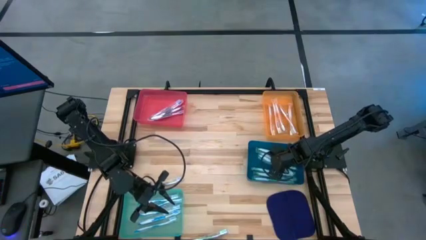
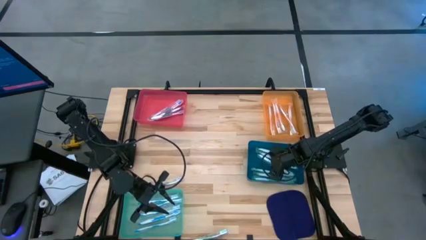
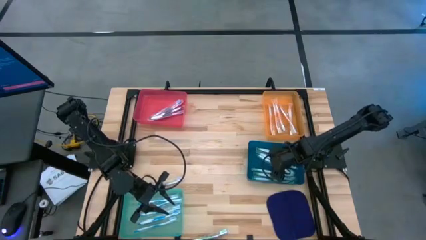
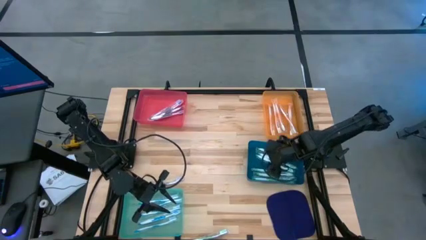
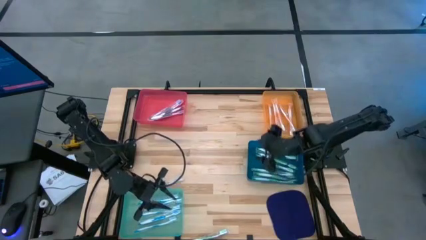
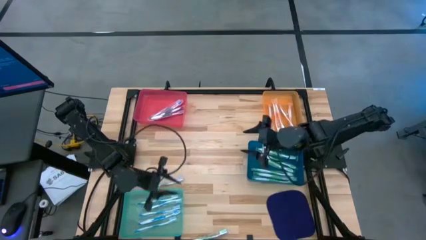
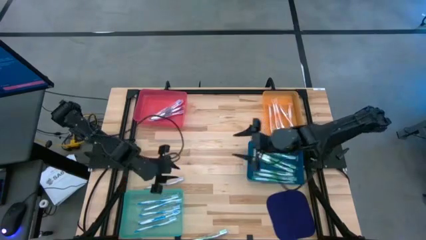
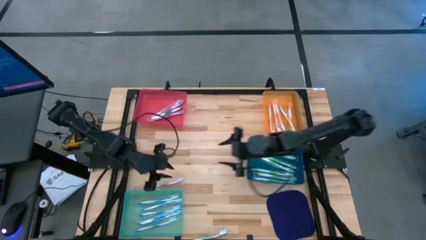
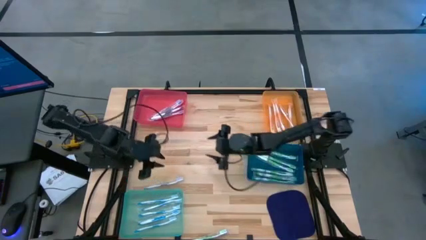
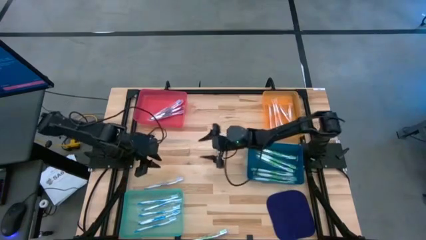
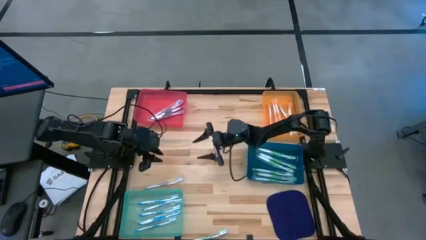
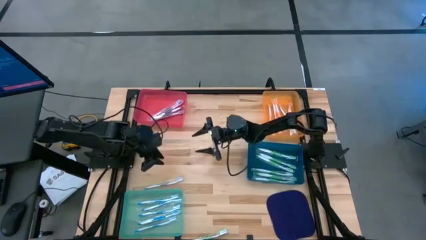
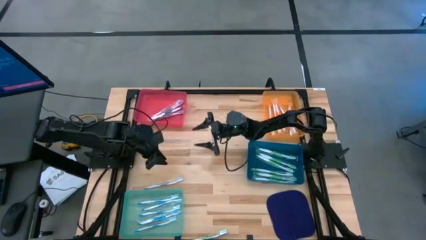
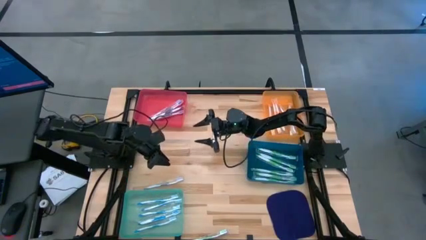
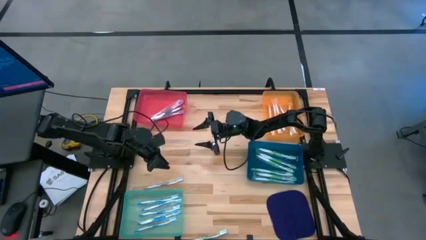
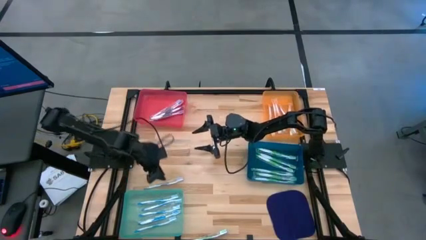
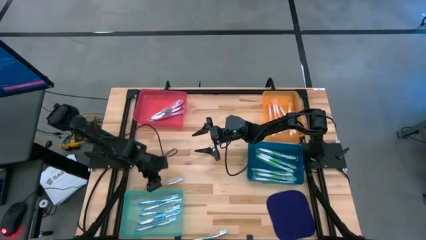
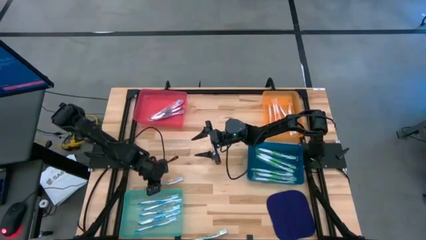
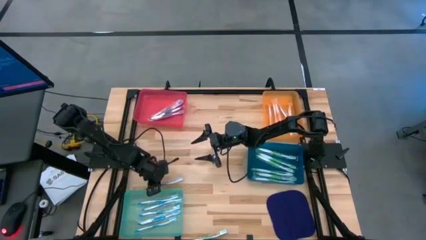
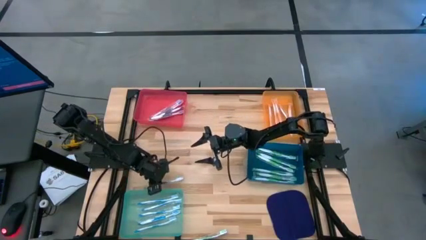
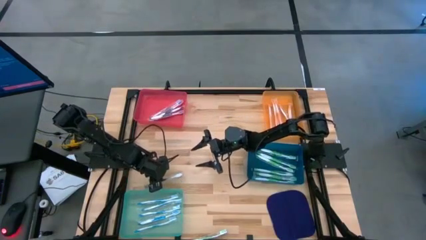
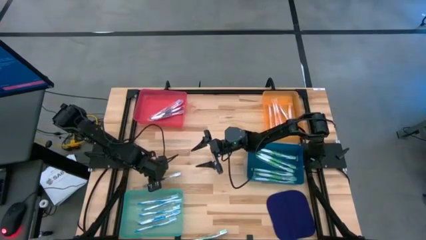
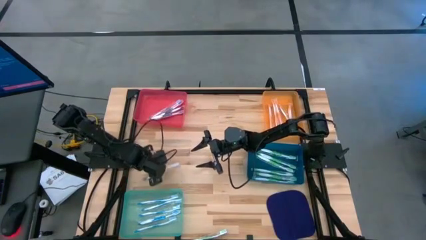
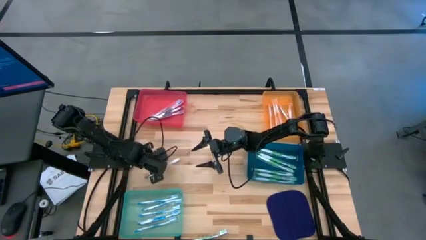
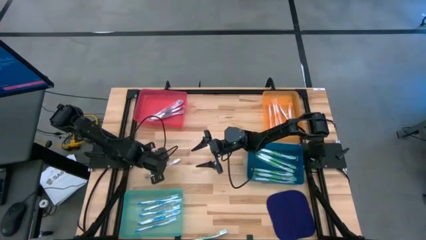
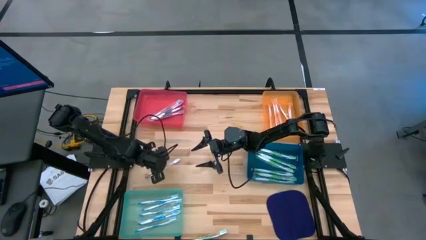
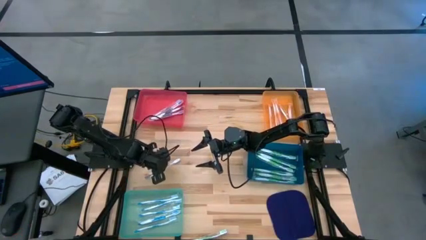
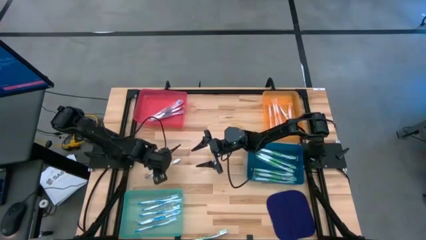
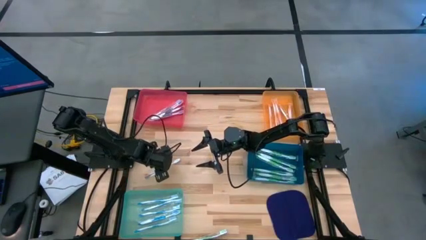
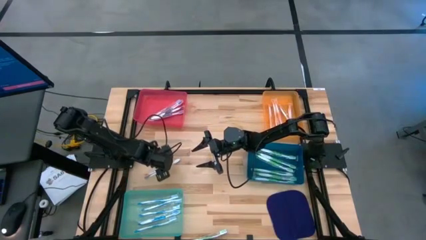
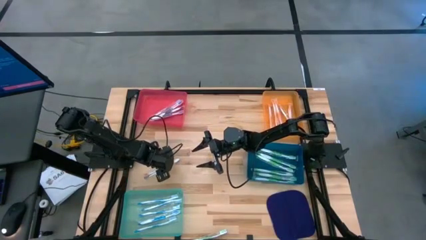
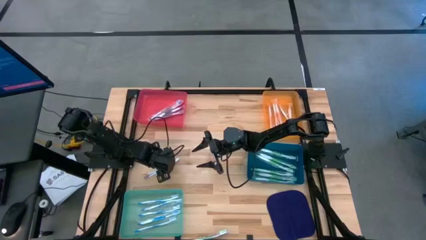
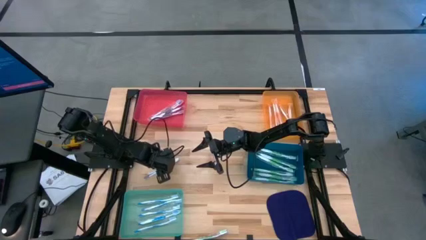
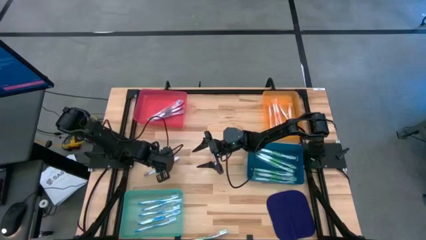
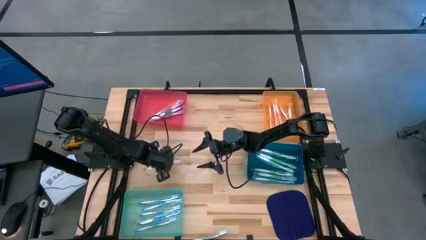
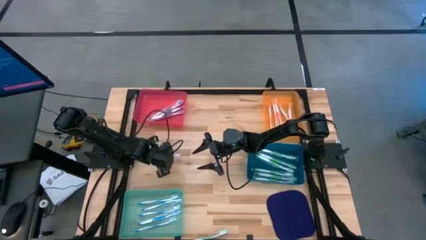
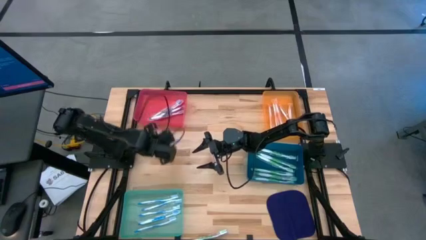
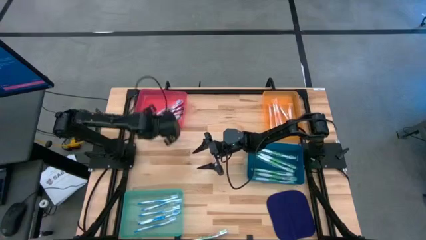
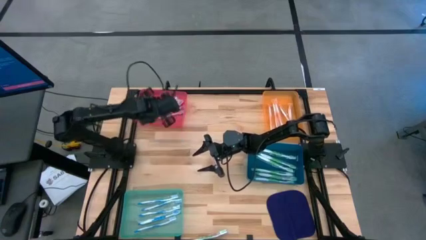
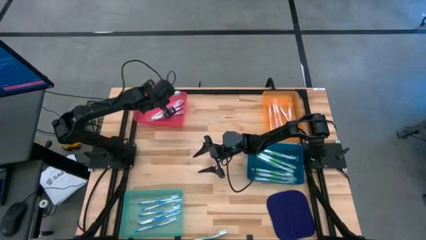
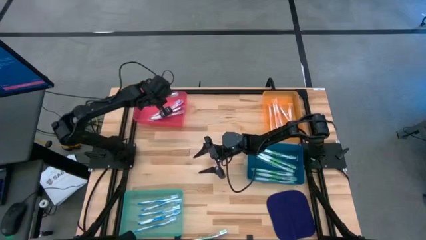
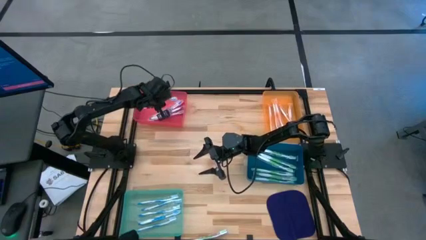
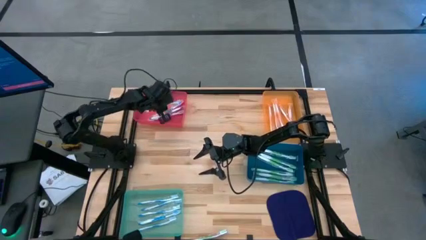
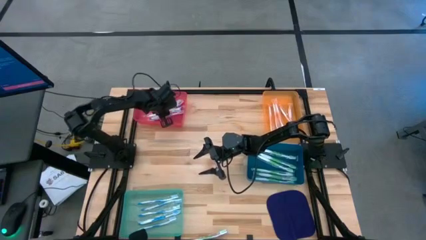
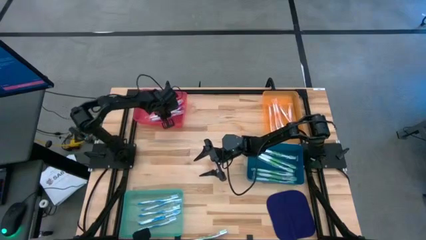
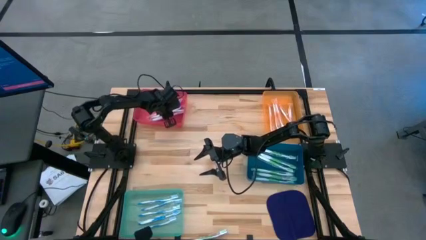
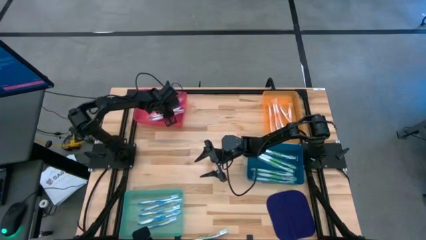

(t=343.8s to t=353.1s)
Task: Pick & Place Toothbrushes
Put the violet toothbrush into the pink bin

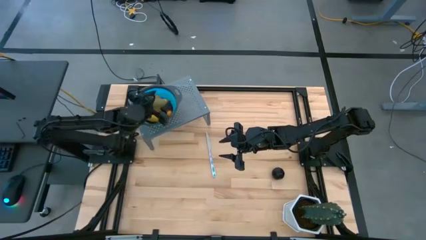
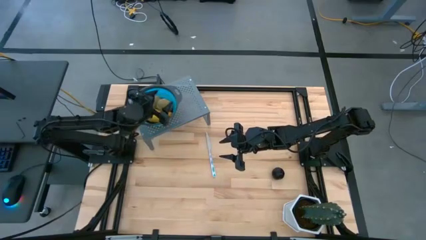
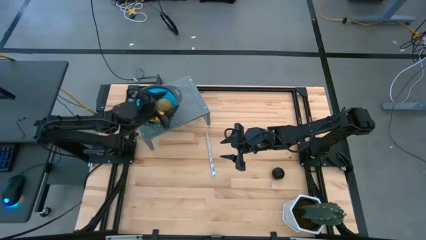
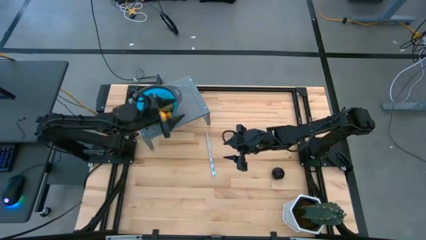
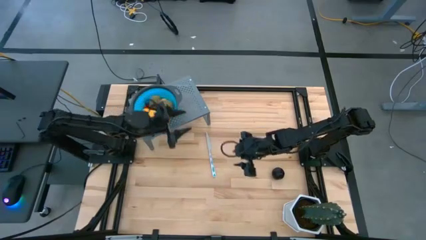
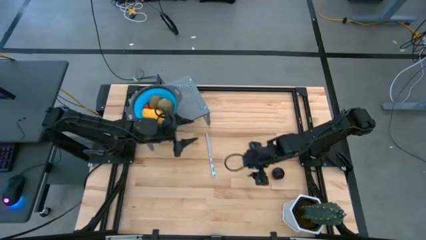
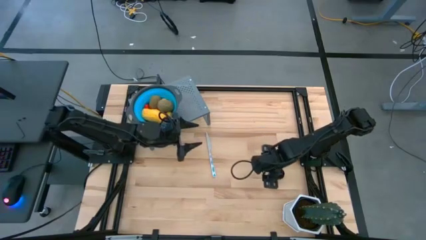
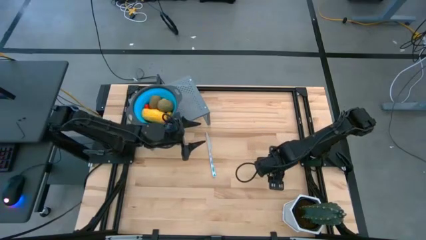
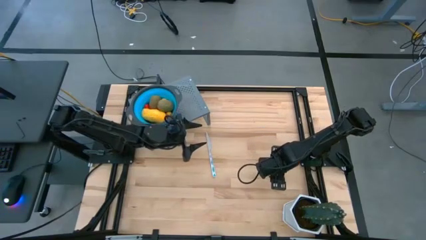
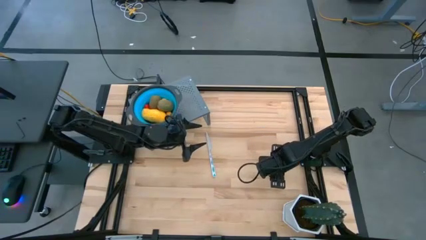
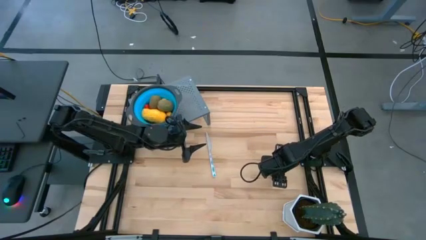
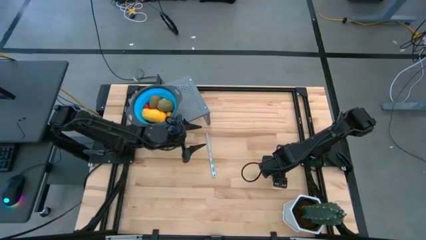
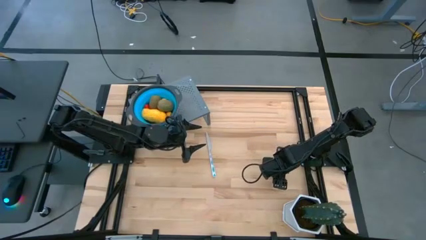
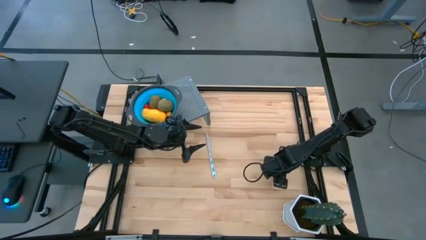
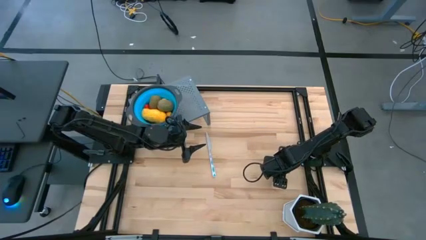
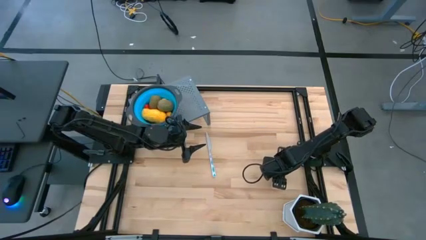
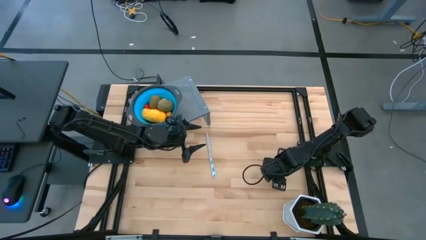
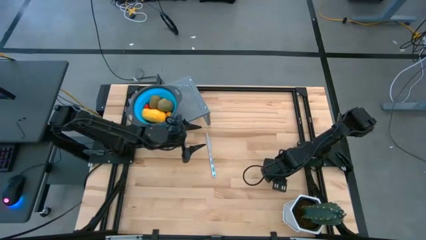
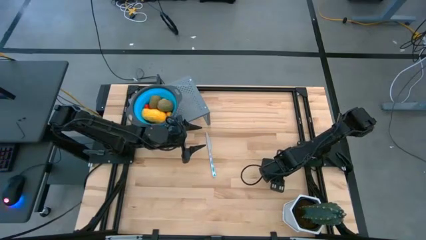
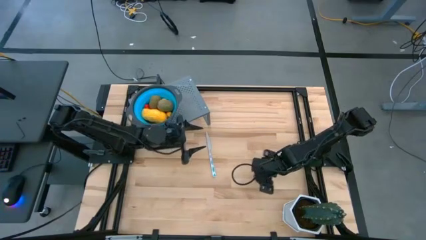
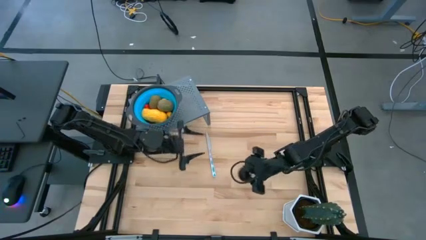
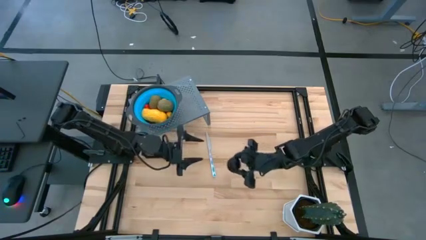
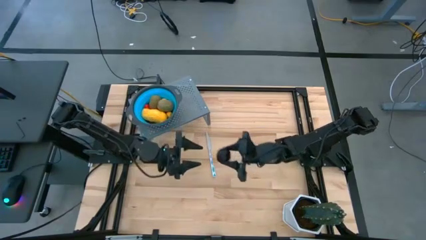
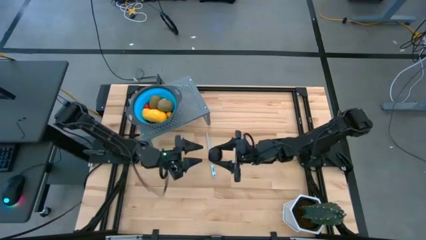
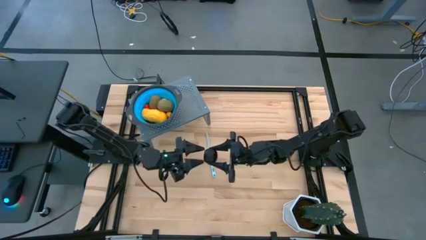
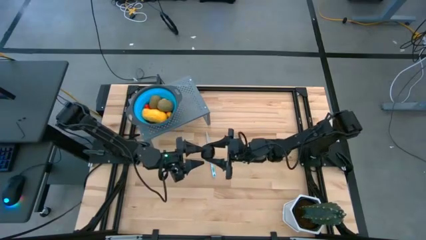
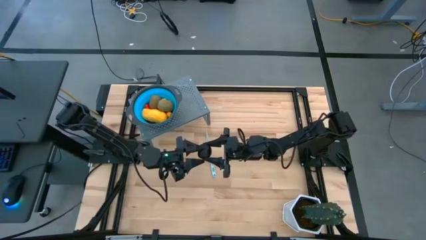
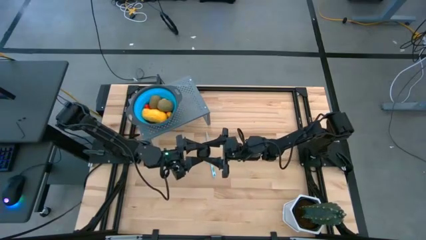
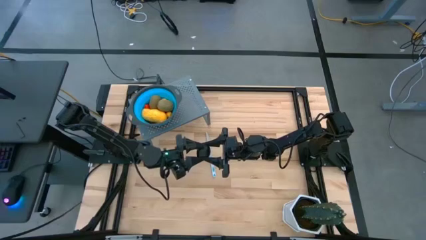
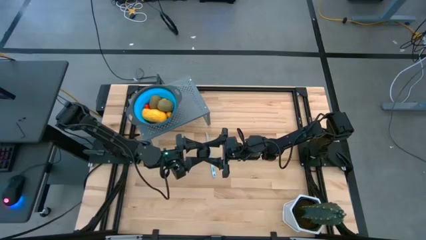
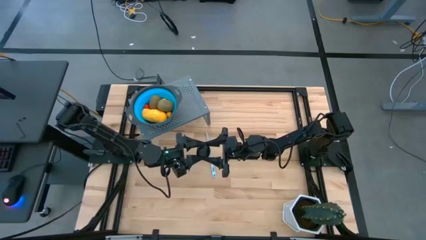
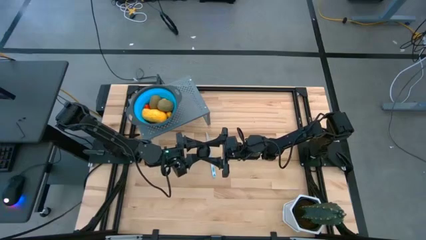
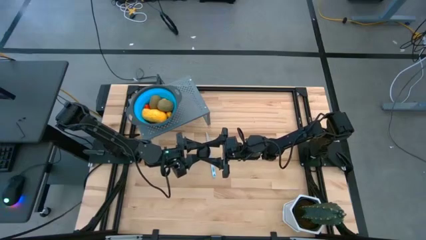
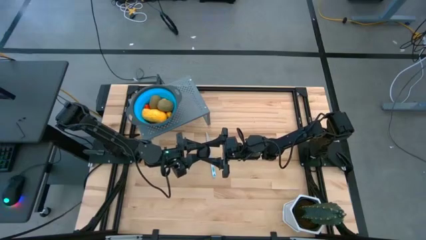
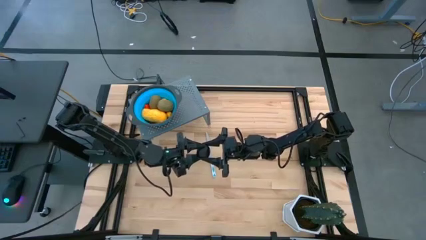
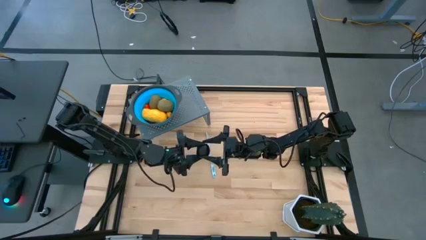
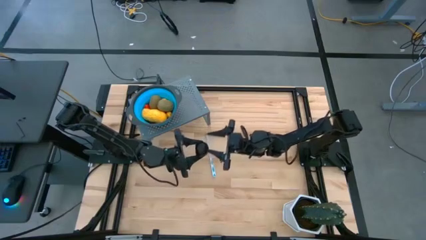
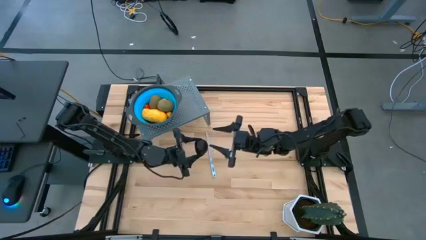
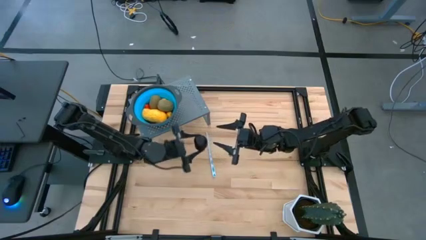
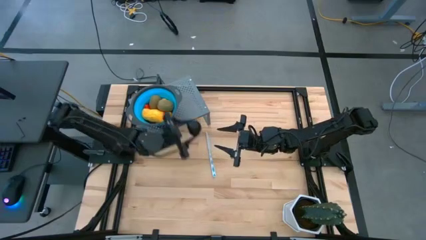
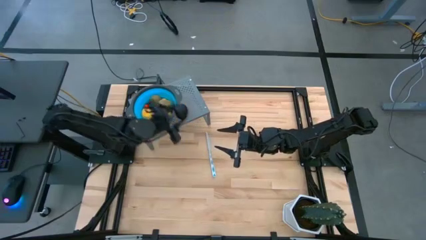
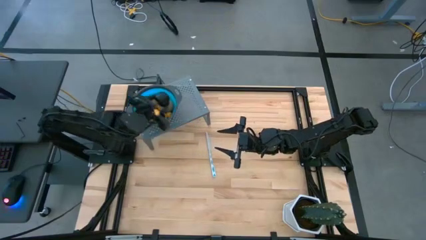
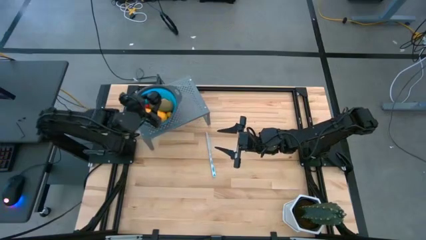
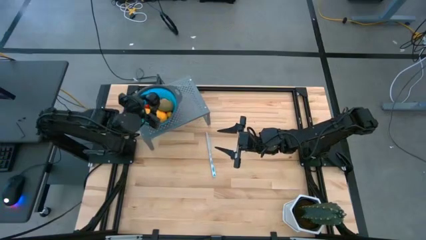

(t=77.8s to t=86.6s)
Task: Pick & Place Fruit
Put the black plum into the blue strainer bowl on the shelf
